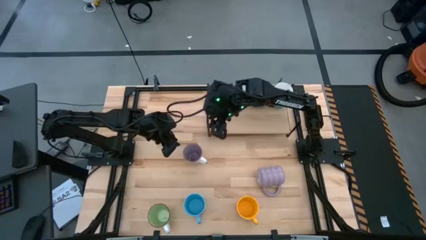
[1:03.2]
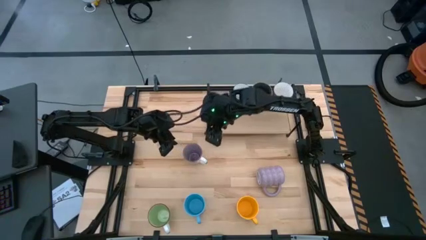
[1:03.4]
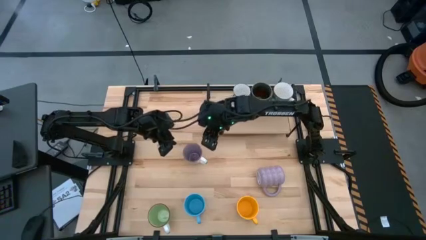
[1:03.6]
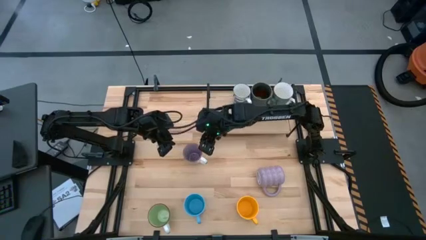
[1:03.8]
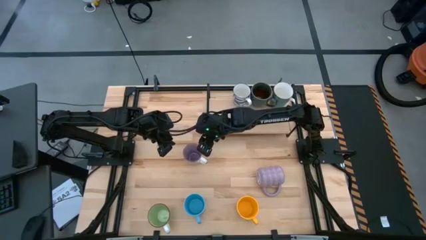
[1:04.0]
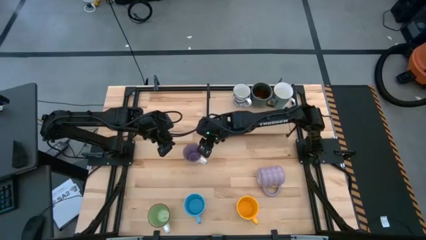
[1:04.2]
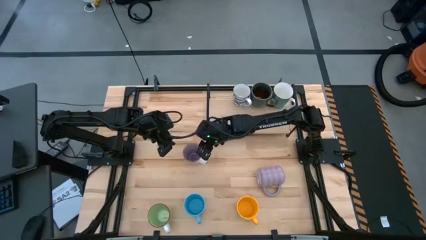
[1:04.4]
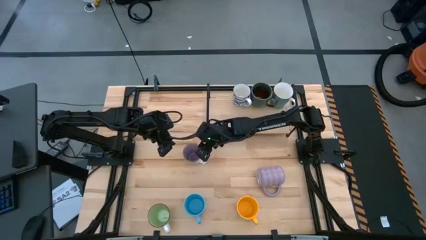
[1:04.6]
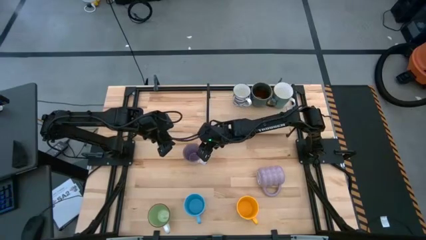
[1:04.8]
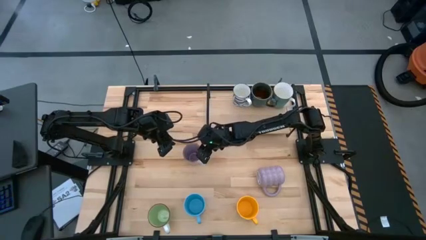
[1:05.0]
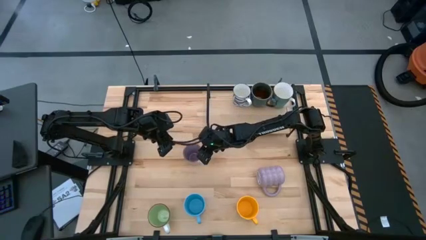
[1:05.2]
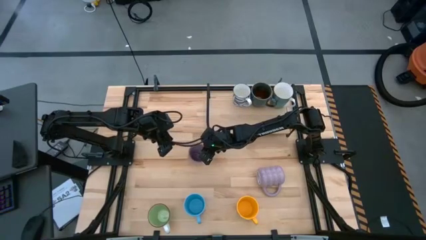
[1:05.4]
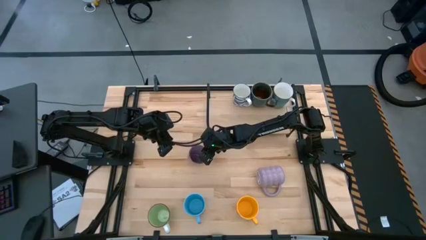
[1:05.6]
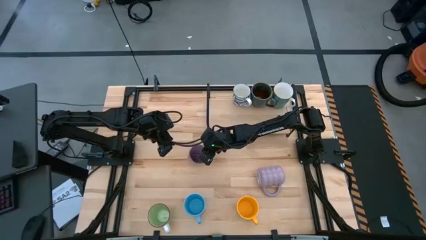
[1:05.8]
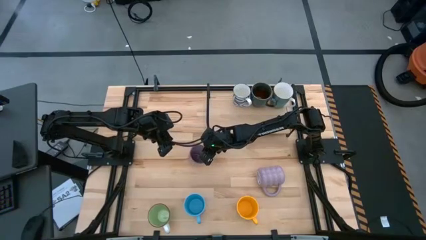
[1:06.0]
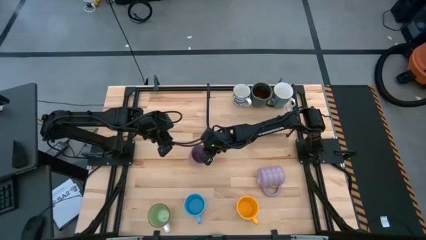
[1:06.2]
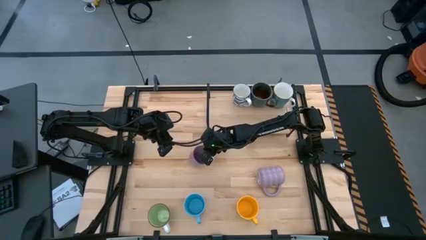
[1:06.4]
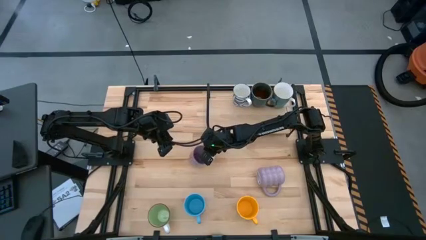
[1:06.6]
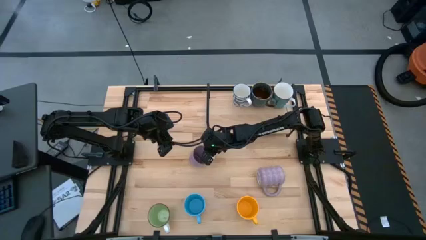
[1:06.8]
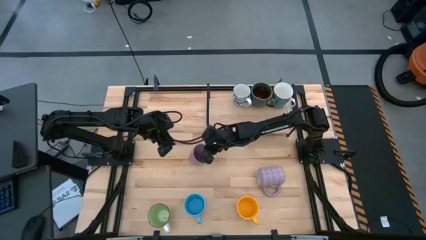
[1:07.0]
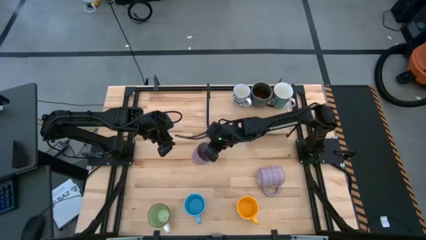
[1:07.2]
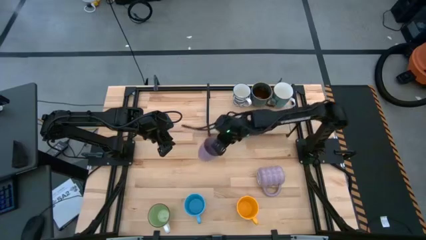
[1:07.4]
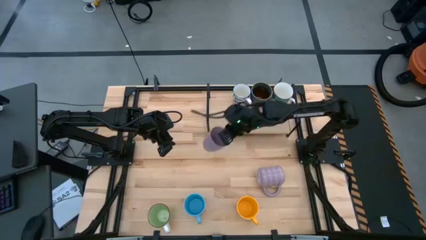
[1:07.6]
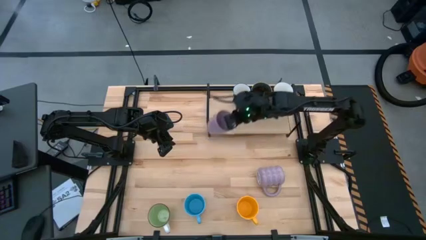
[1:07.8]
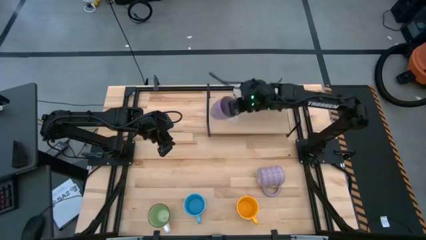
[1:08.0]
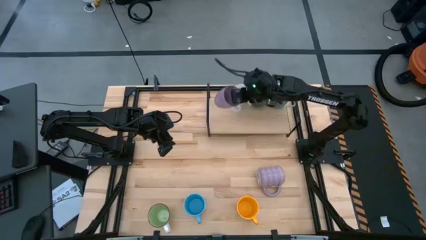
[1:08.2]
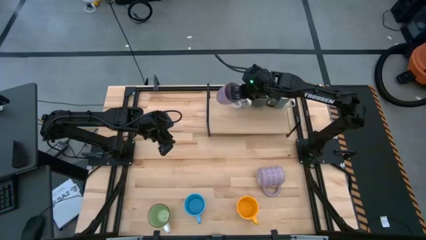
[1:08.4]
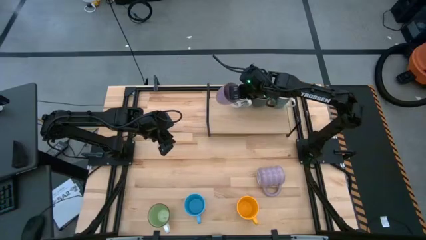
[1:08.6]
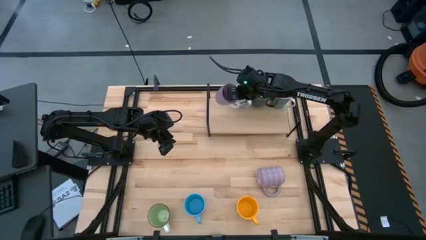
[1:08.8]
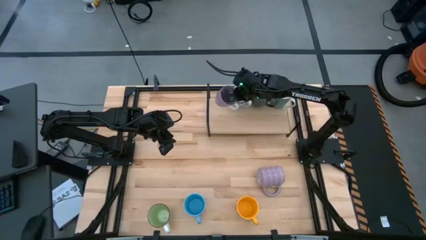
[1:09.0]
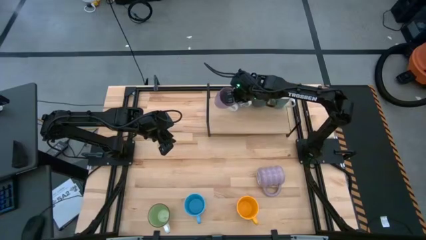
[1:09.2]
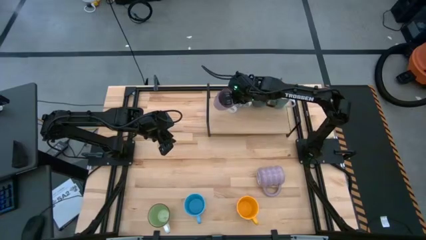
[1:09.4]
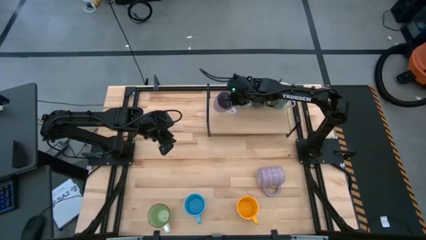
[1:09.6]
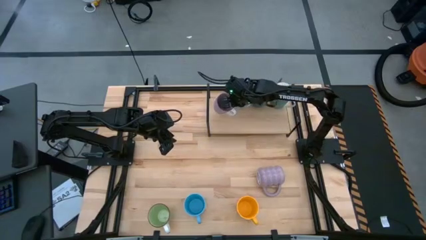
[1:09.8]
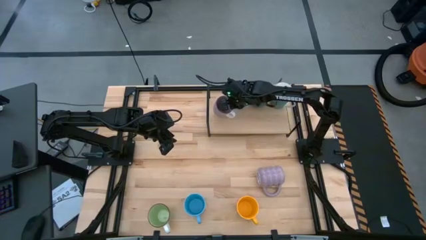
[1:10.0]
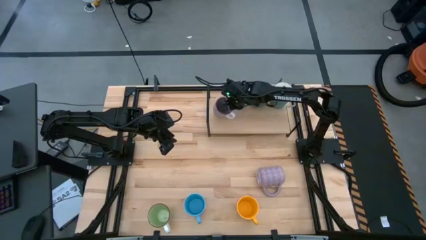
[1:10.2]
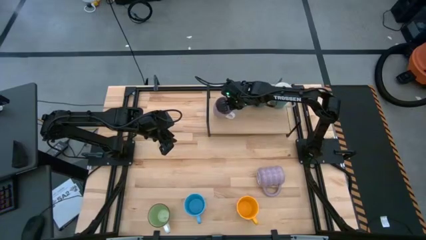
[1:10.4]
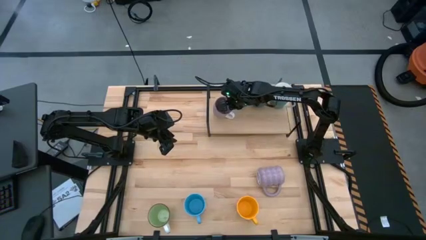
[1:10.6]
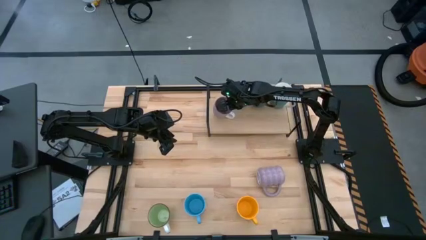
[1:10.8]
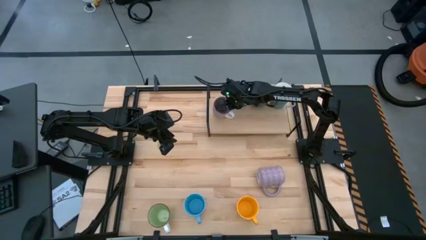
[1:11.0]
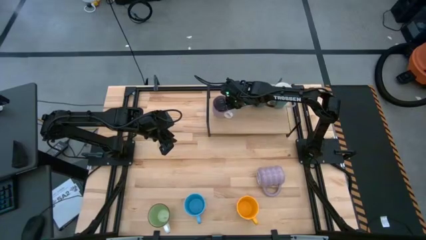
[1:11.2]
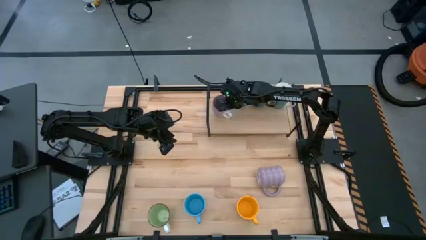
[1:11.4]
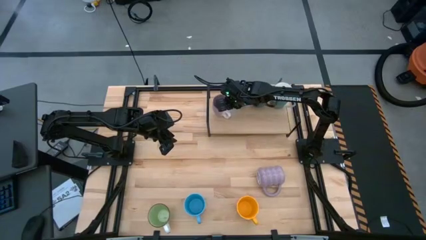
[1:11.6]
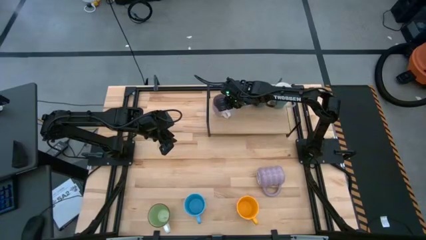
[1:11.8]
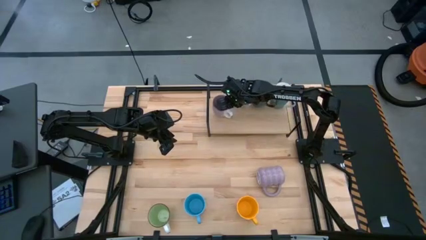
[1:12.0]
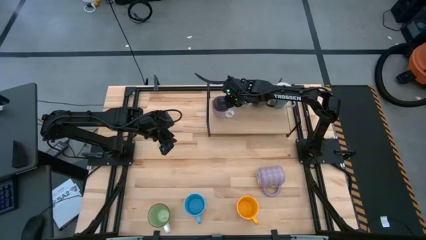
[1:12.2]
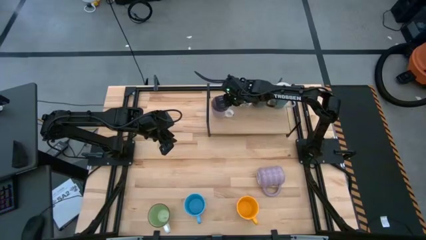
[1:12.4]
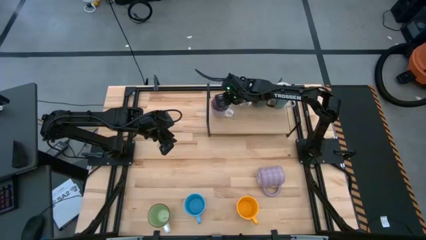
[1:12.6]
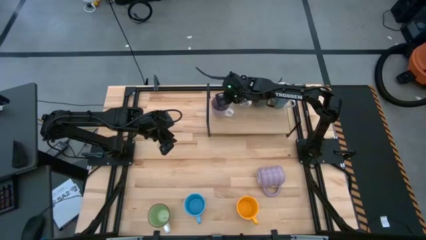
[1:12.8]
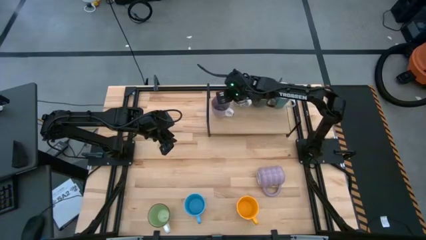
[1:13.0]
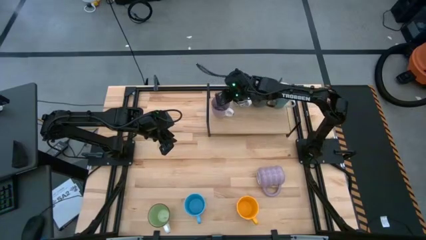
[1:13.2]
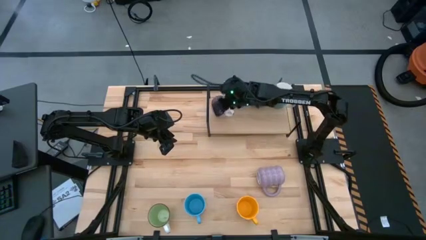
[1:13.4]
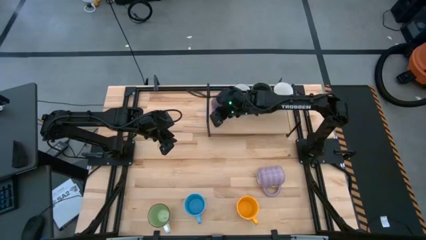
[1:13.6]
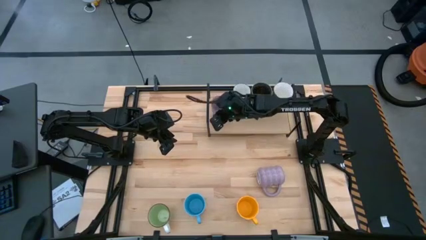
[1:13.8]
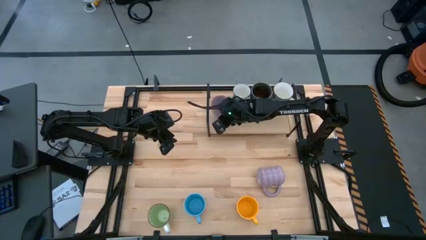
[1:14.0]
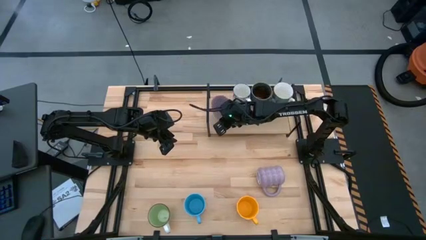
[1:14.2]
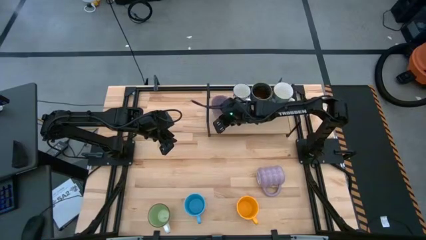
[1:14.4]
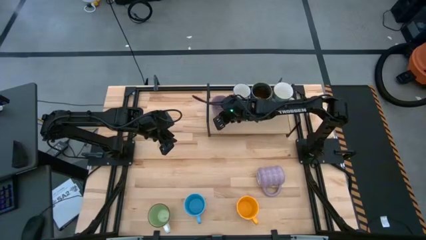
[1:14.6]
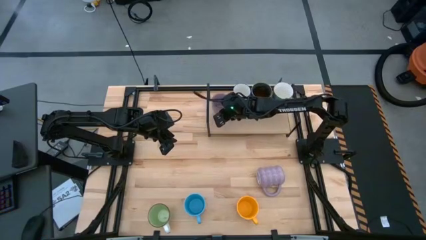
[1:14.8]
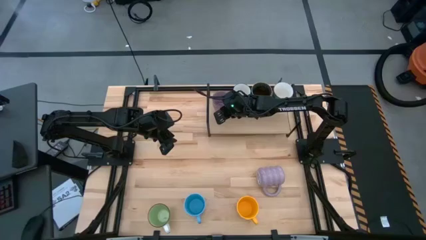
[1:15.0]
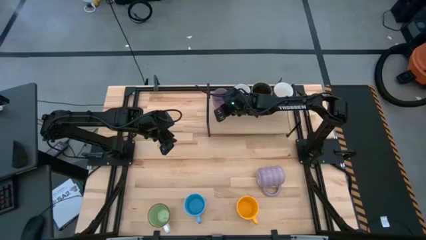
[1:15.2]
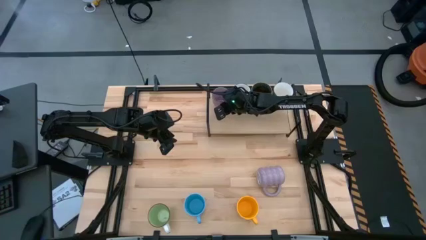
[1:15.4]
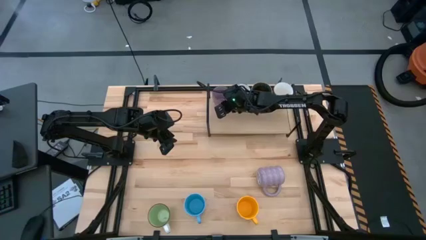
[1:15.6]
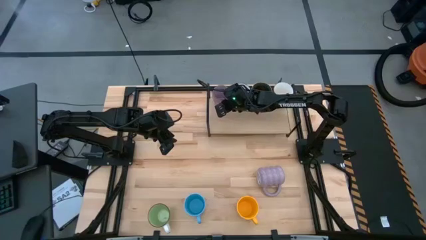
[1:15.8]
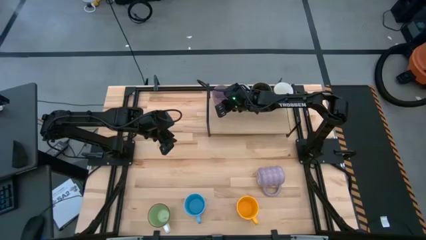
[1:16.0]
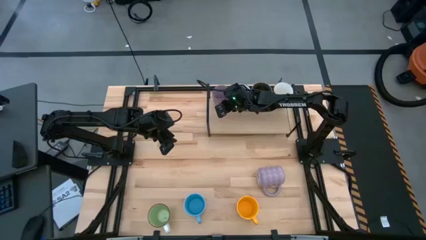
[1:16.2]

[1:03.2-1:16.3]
Task: Place coffee mugs
Put the purple mug on the shelf

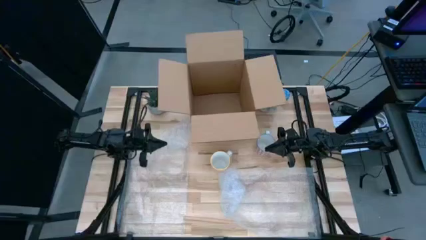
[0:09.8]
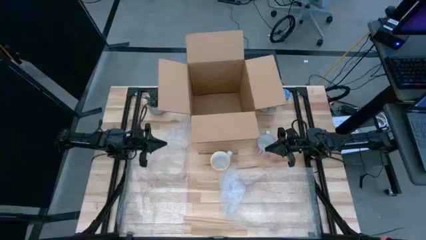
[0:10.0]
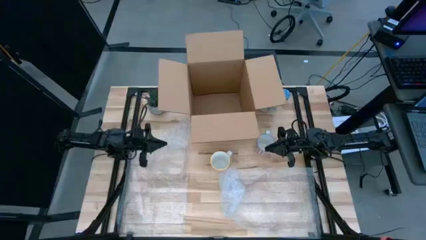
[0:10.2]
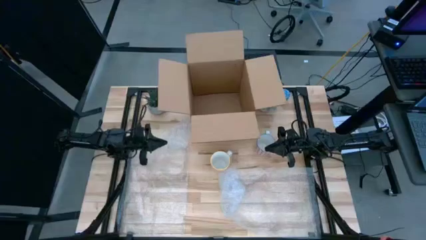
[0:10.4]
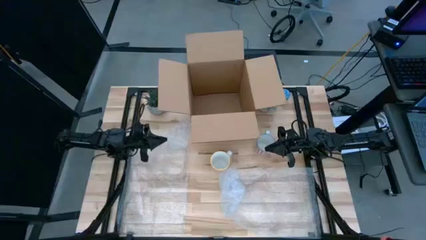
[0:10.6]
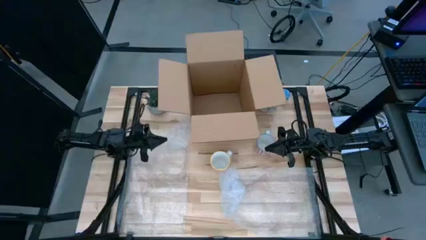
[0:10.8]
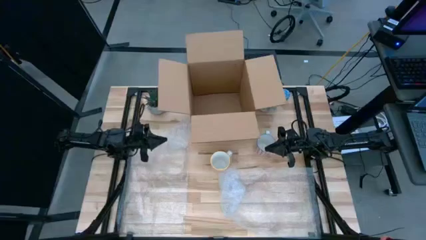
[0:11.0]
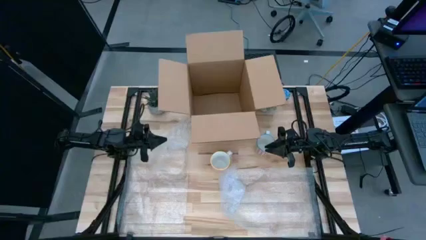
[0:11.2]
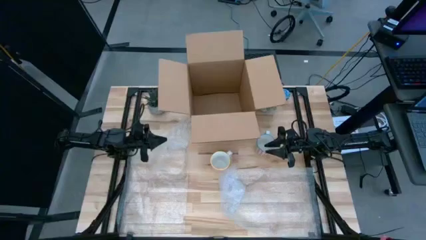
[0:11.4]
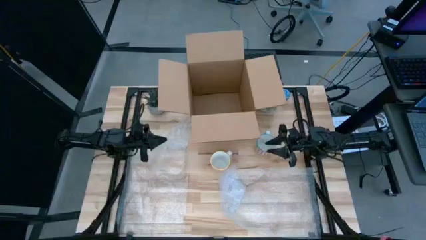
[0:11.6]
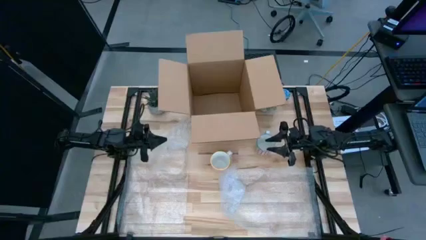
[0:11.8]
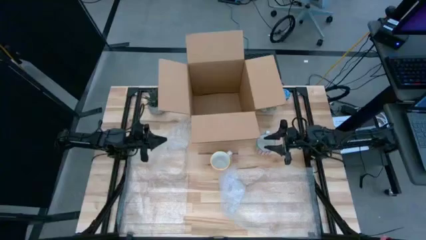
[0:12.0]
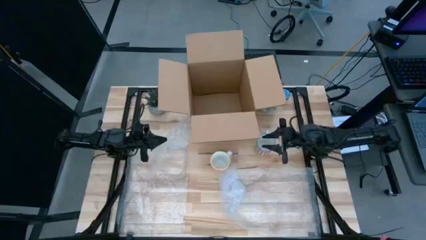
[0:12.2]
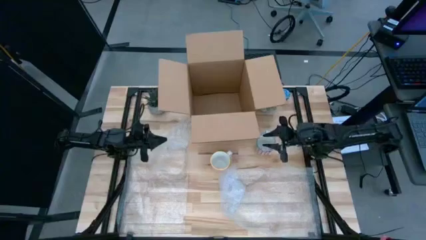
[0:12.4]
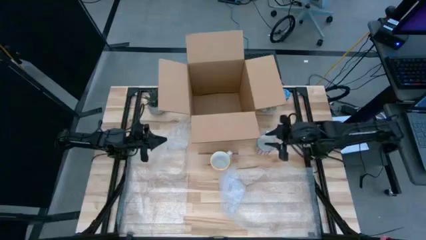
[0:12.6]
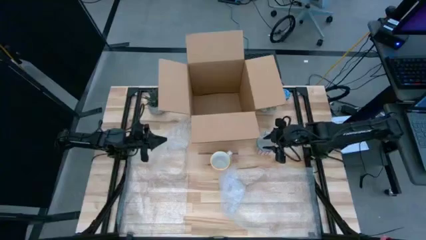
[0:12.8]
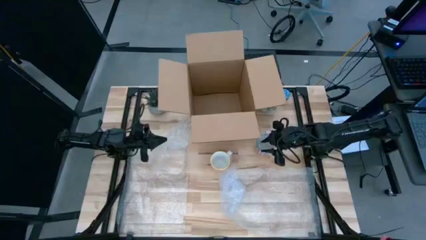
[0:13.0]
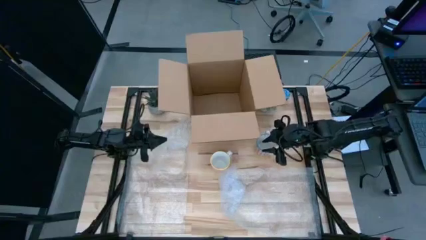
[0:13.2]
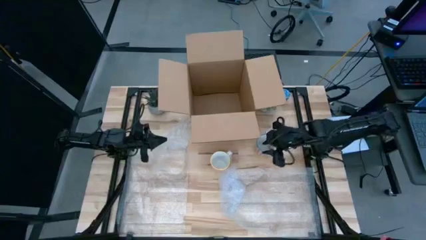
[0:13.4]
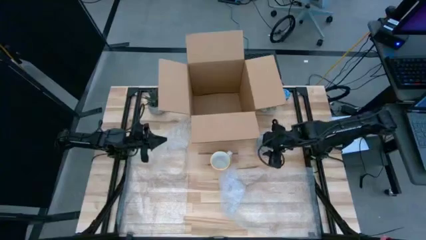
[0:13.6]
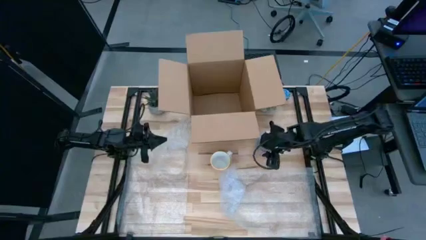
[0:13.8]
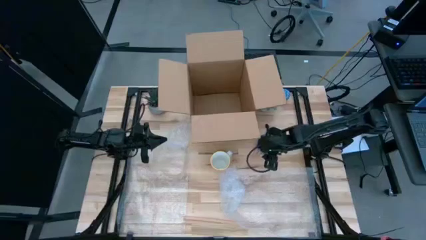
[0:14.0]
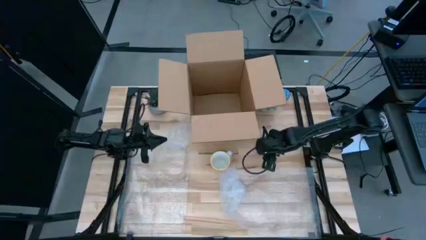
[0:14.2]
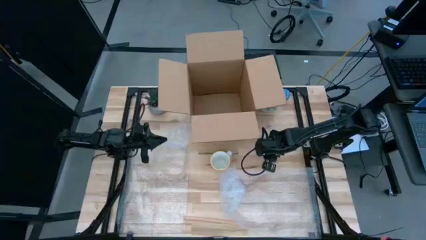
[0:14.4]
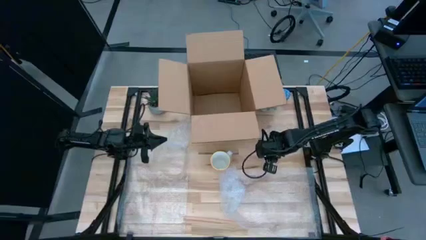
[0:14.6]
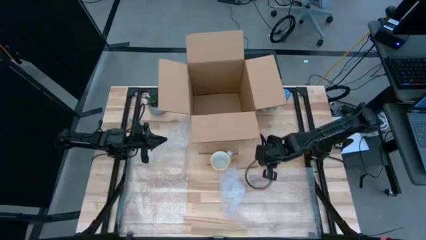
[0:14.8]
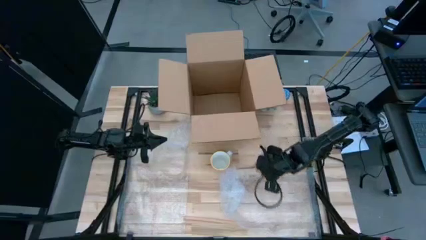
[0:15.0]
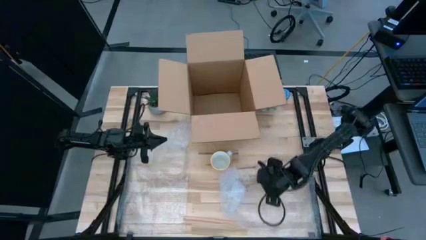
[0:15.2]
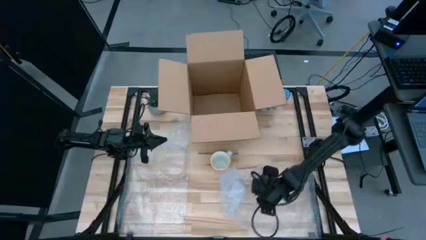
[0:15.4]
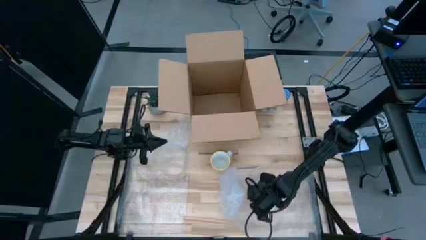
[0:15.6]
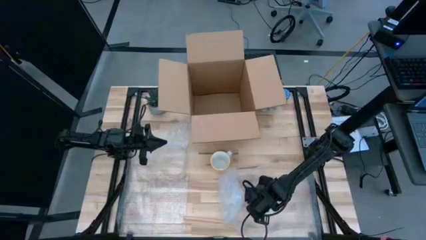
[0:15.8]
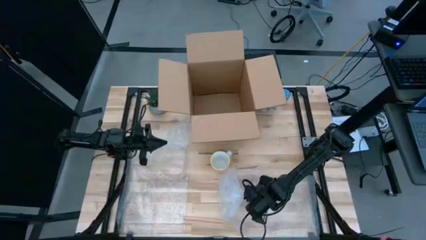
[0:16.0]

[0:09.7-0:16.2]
Task: wrap mug
Wrap the red mug with bubble wrap
